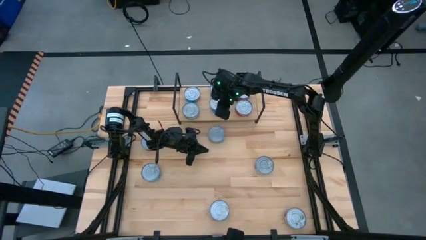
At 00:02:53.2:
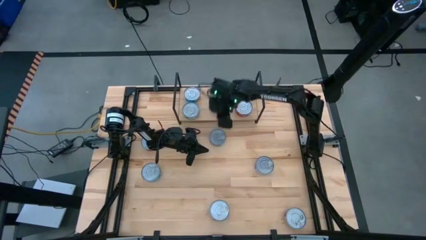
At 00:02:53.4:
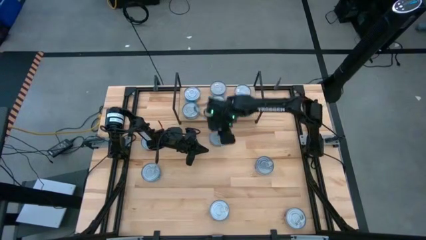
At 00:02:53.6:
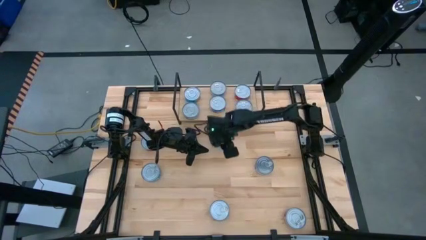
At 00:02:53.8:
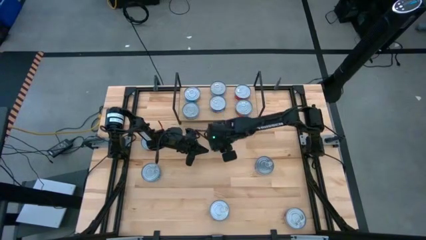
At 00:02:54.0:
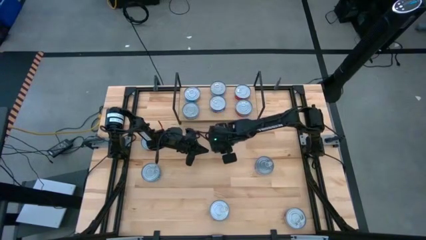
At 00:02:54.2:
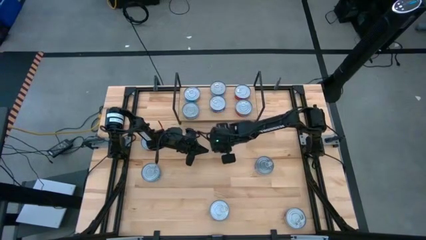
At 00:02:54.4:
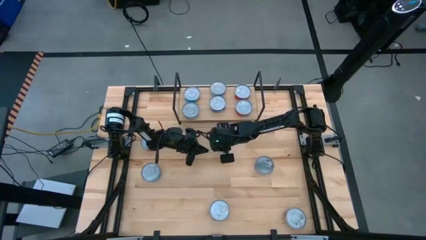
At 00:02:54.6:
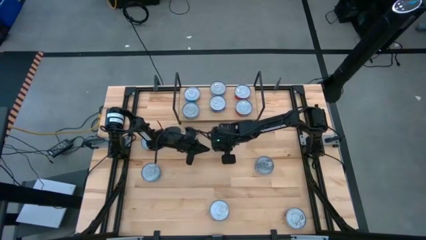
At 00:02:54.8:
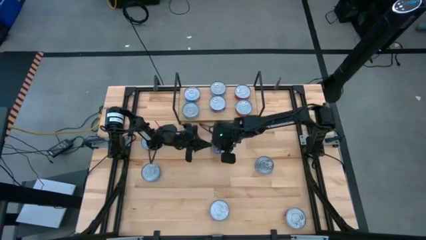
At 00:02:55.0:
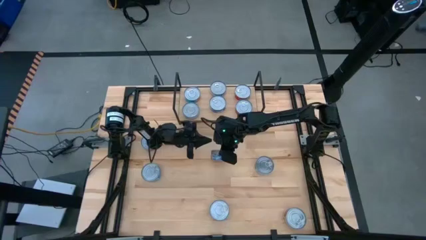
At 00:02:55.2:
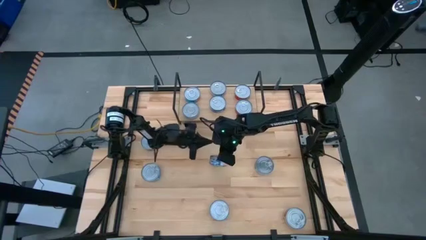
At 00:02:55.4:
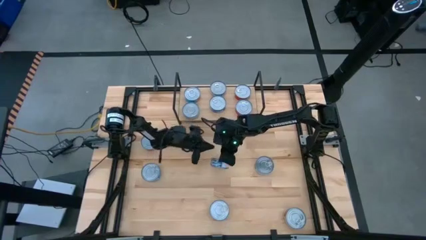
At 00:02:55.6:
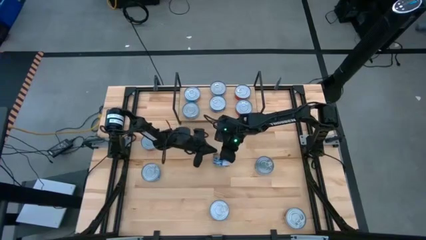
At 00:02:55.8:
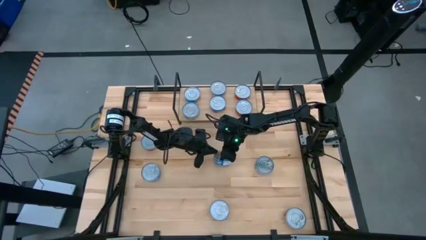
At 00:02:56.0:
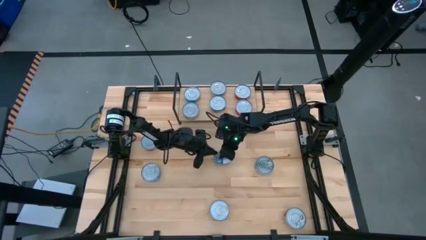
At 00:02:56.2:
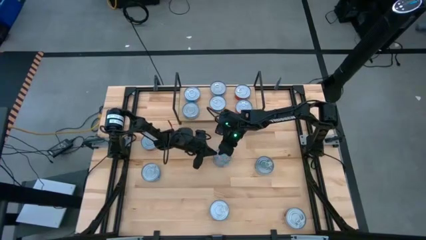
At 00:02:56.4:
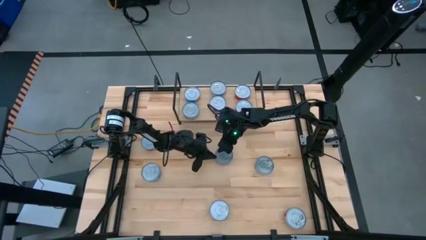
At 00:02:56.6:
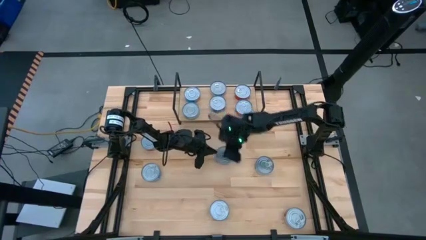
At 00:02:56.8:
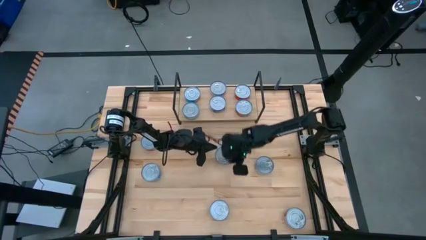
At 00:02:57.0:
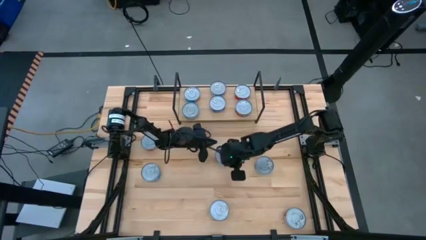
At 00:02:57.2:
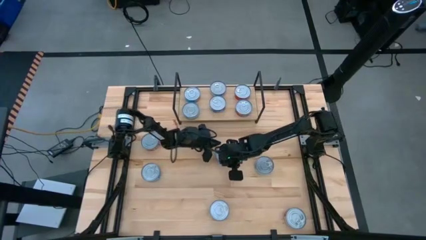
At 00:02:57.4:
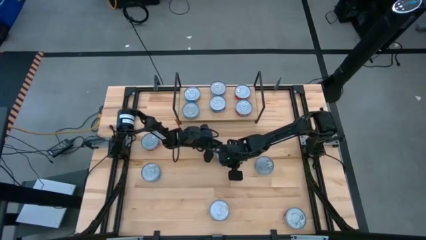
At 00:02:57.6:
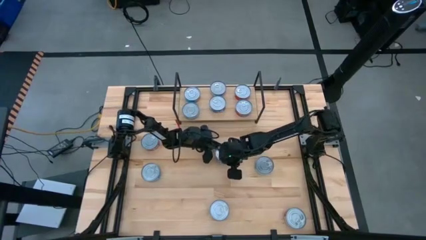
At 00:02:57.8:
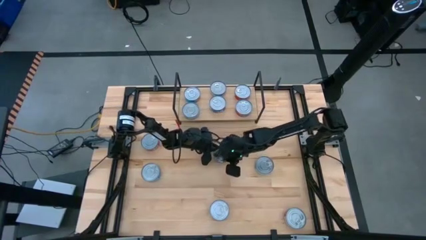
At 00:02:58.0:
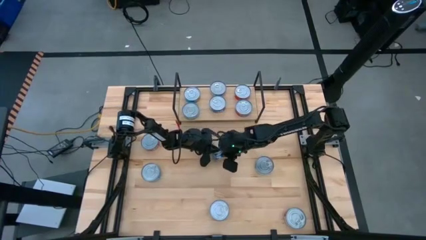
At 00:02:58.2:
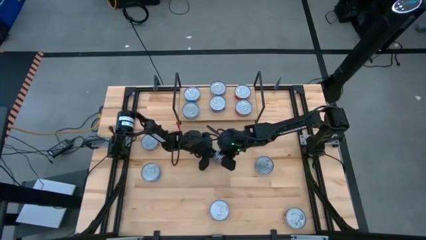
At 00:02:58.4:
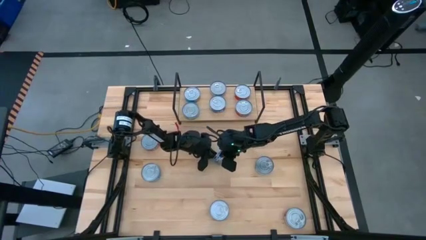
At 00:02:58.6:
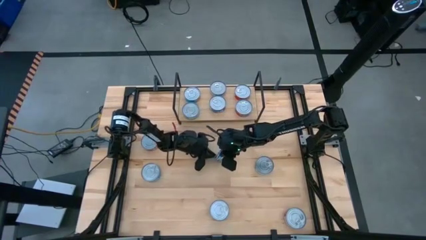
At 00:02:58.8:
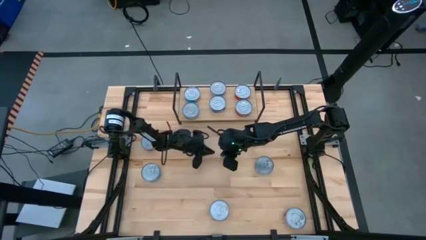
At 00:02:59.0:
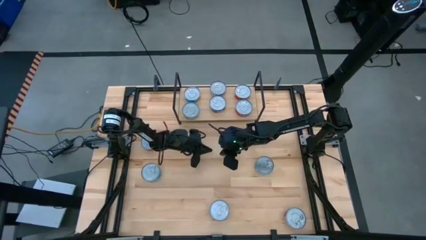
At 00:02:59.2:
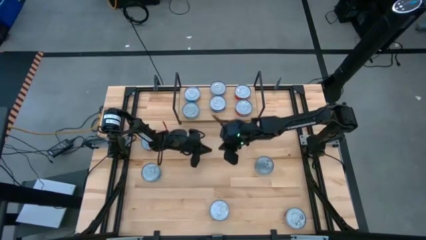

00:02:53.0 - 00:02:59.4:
Task: Stack canned seafood by type on shelf
Stack the middle top blue tuna can on the top of the other blue tuna can on the shelf

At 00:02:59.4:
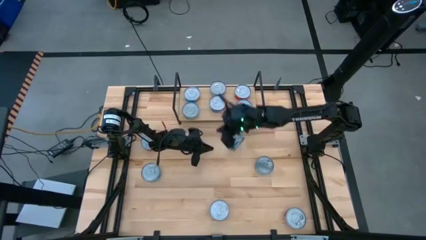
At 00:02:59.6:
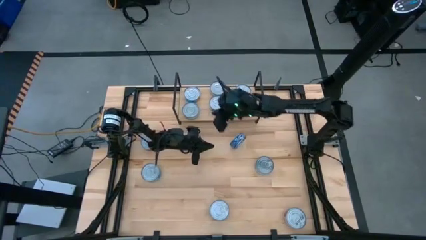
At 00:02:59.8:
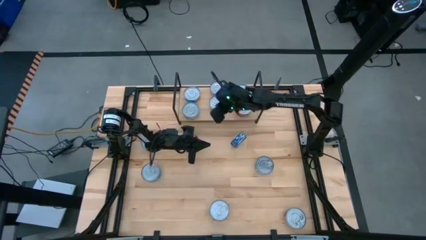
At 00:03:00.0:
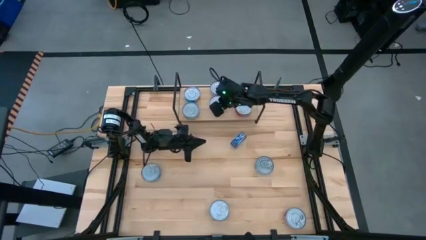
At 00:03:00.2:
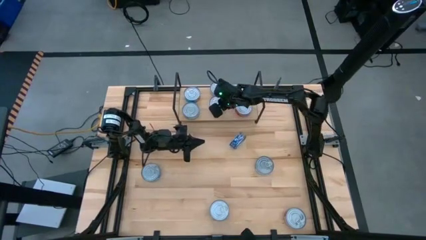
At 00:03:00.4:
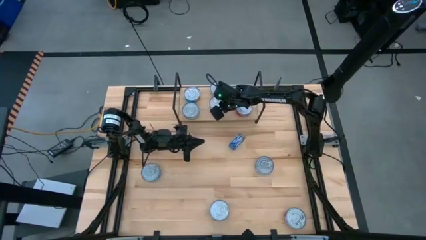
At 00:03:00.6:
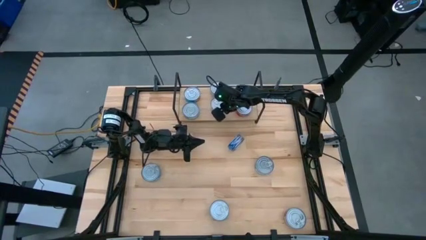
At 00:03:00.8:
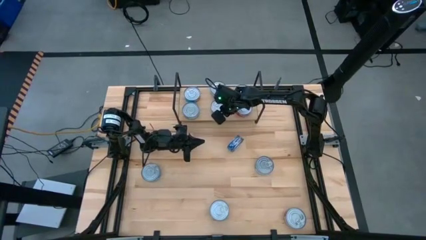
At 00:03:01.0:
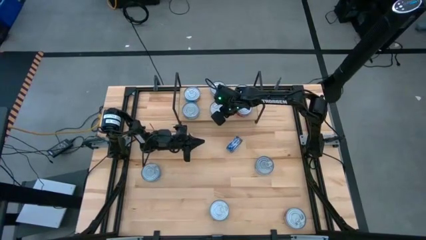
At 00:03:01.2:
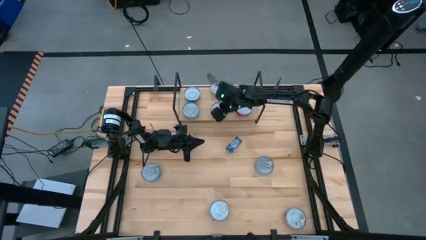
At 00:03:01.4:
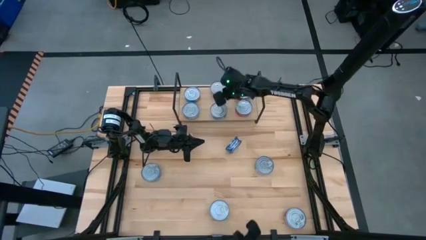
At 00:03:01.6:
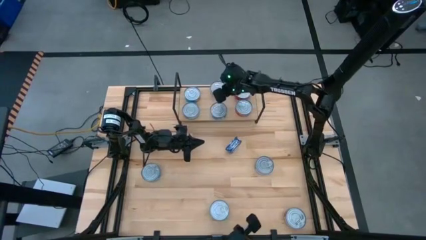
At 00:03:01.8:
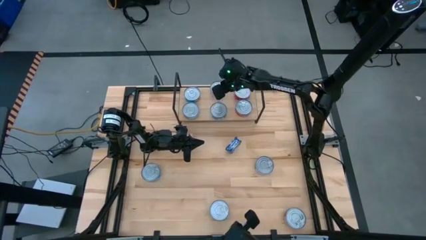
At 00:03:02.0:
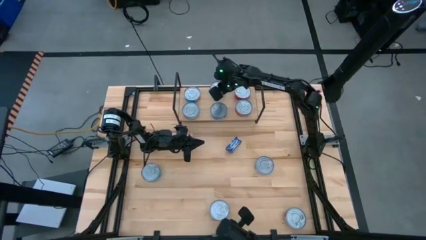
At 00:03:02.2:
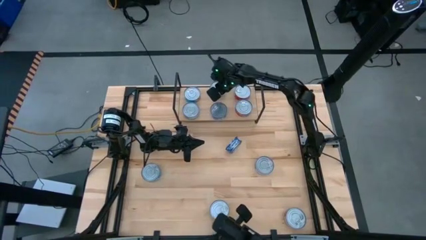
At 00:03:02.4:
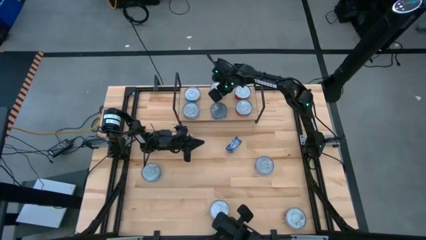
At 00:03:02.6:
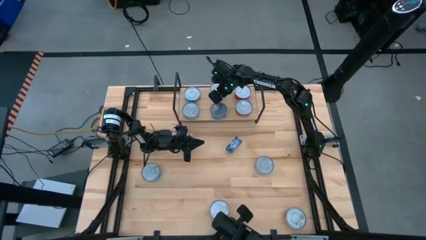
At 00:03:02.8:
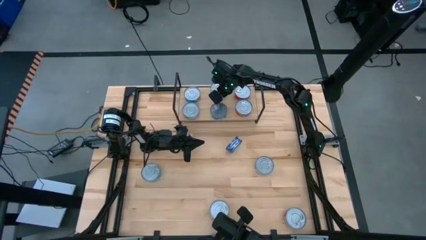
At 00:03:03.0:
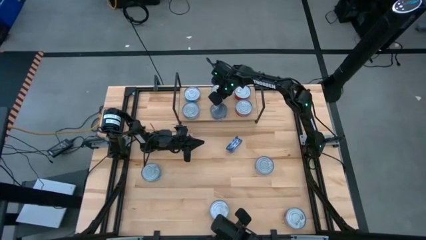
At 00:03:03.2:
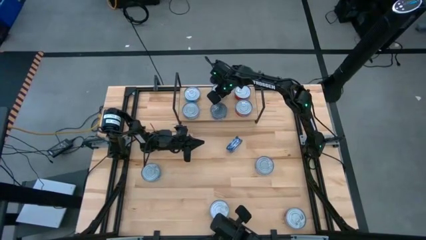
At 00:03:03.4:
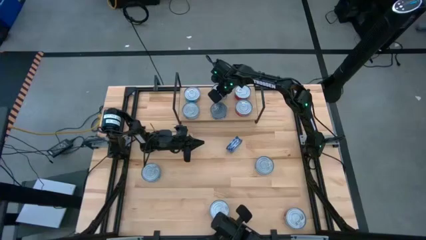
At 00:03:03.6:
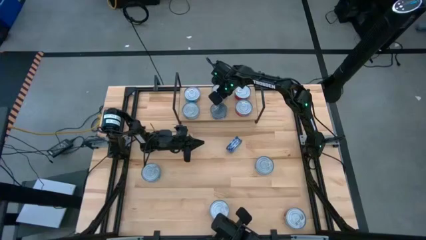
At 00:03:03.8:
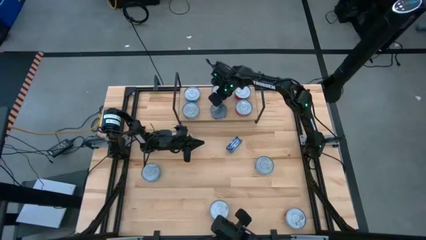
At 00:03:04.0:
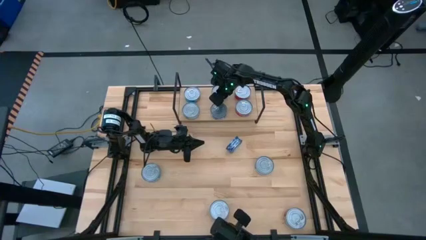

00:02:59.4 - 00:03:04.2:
Adjust the blue tuna cans

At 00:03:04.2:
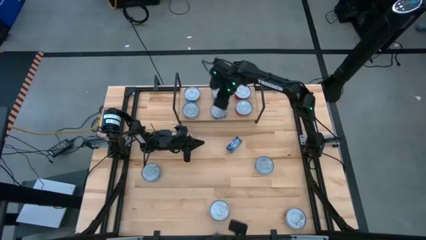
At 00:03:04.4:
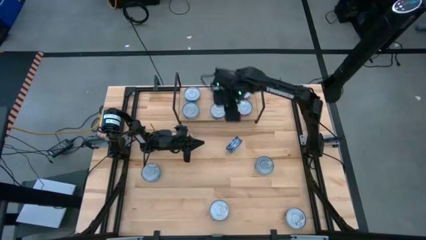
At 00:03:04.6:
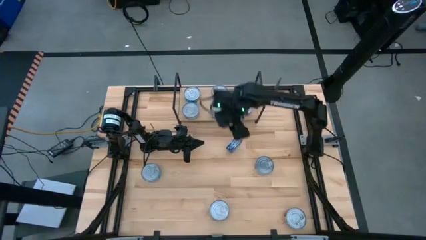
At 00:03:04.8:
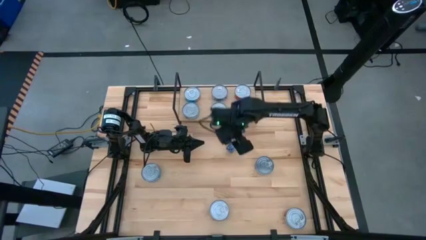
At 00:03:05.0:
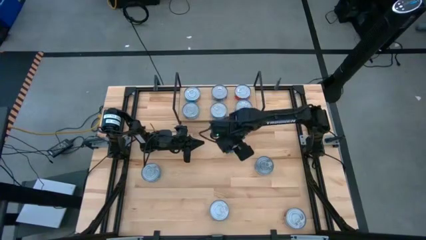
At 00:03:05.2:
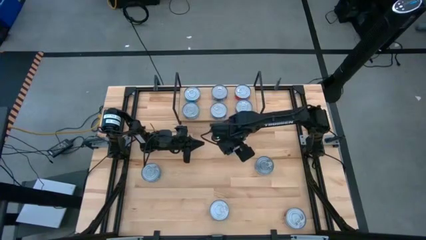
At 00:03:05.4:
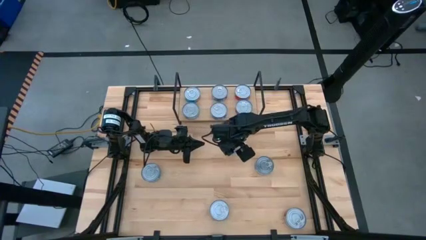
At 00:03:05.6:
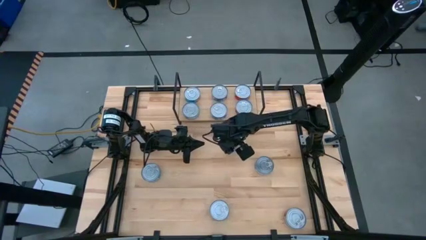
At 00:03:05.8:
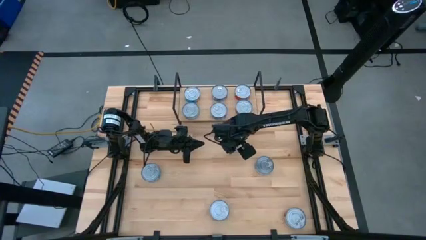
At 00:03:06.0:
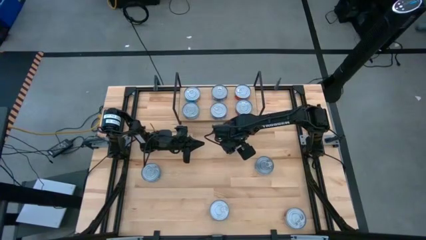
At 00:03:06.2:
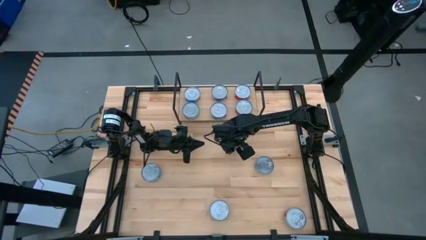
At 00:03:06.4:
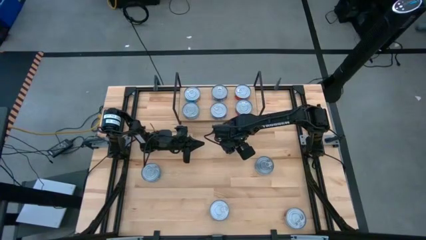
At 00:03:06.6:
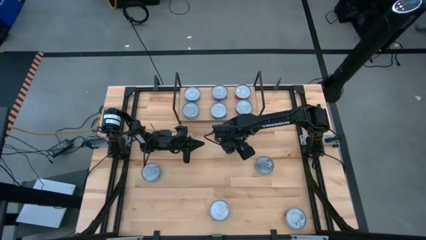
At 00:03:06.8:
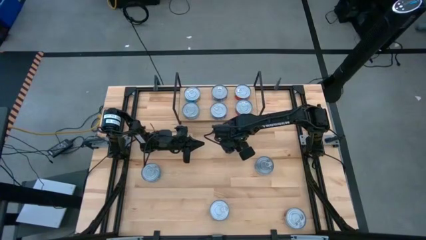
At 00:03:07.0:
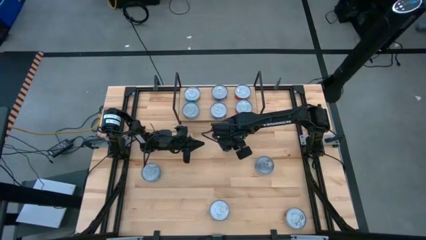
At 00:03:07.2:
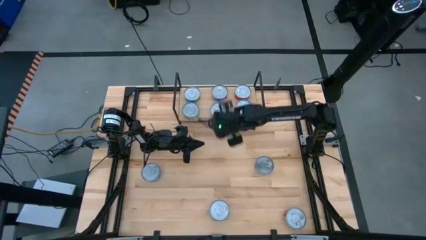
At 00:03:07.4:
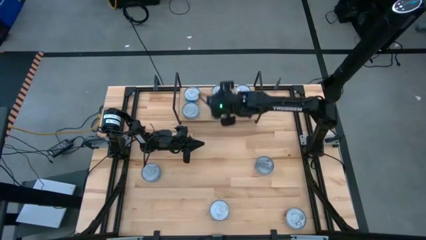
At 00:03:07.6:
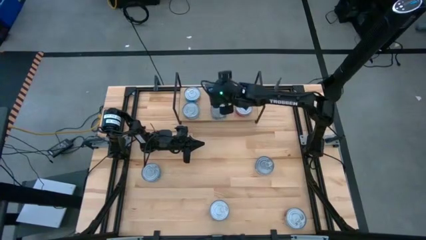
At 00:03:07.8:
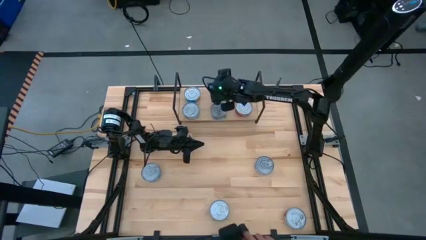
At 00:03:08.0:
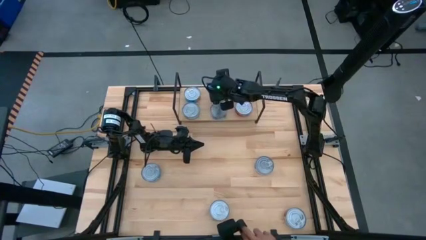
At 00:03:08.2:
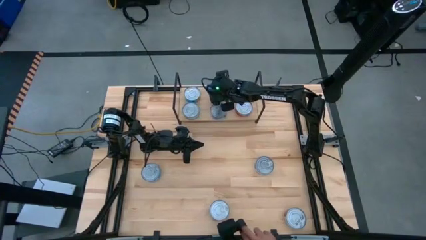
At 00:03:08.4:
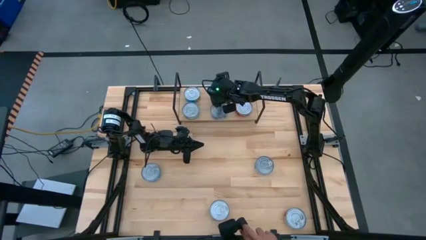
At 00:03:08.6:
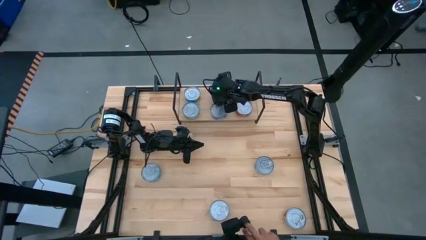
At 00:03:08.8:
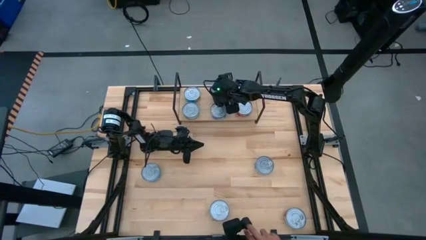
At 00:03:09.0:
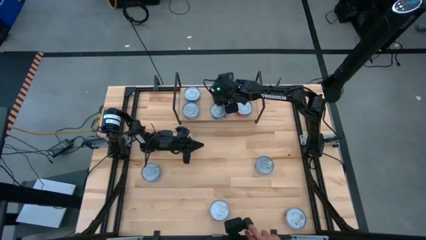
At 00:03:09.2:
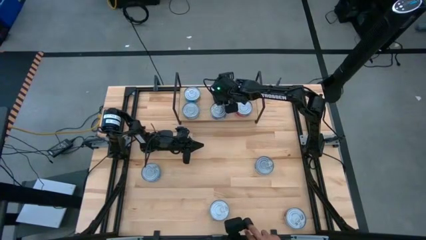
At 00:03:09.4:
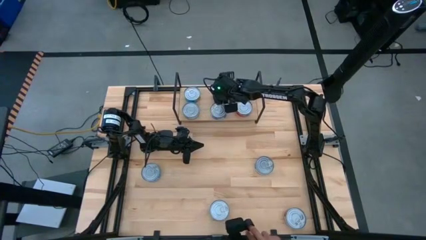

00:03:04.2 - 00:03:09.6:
Stack the middle top blue tuna can on the top of the other blue tuna can on the shelf
